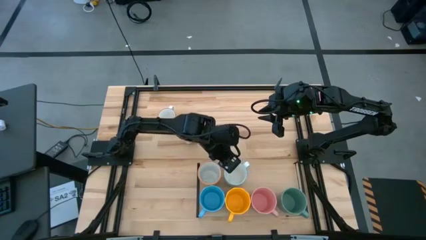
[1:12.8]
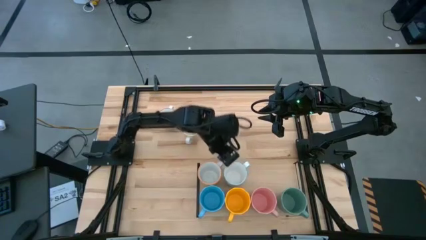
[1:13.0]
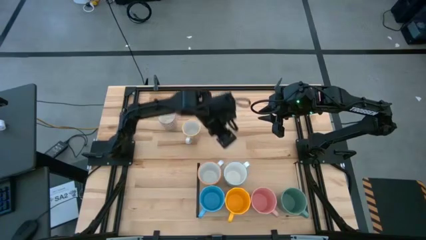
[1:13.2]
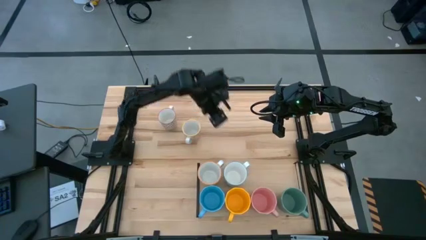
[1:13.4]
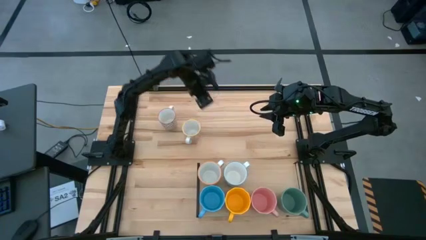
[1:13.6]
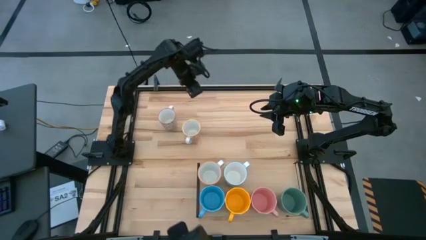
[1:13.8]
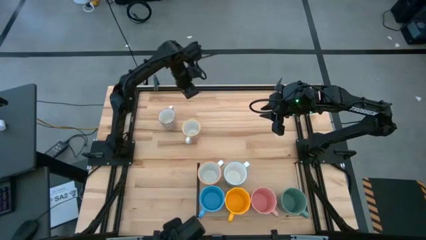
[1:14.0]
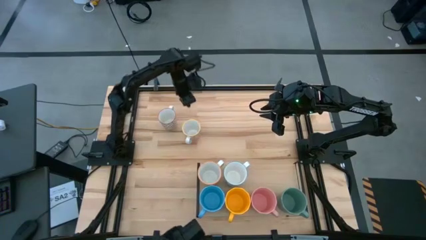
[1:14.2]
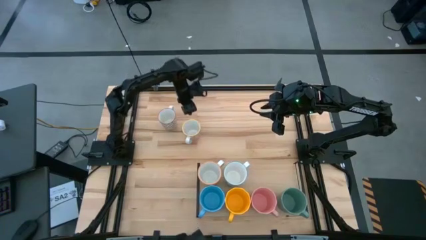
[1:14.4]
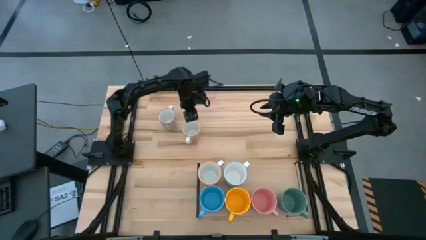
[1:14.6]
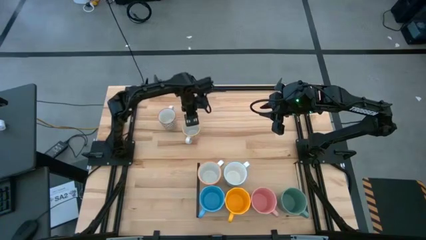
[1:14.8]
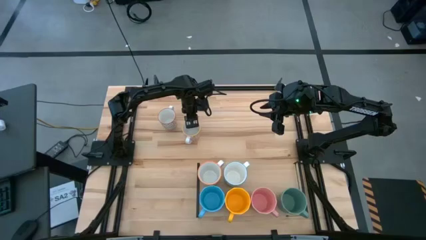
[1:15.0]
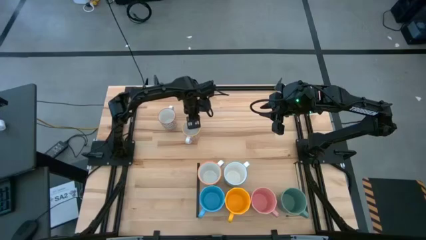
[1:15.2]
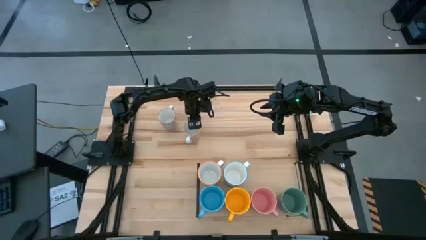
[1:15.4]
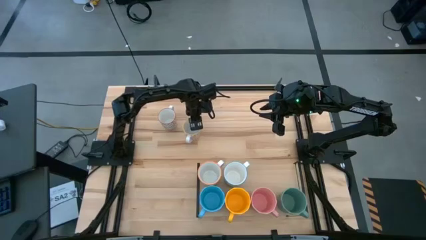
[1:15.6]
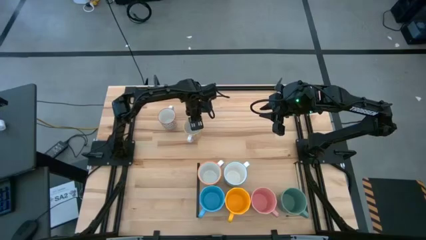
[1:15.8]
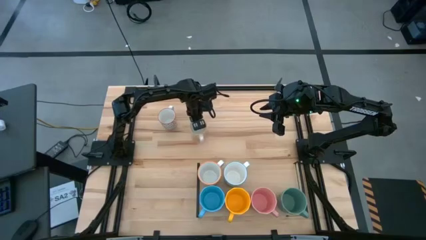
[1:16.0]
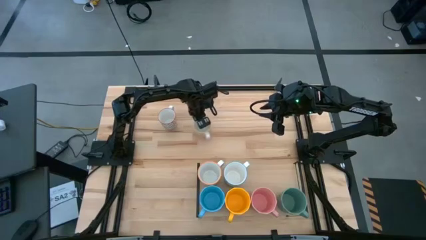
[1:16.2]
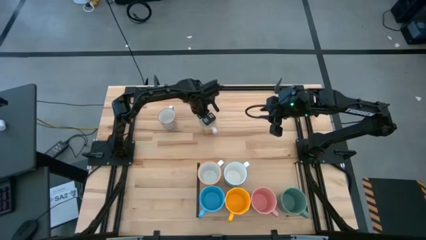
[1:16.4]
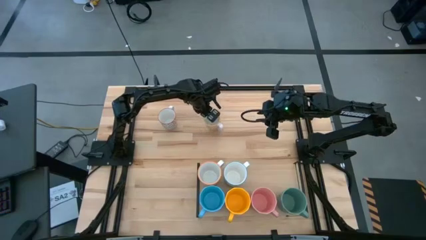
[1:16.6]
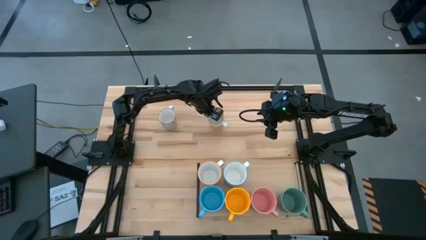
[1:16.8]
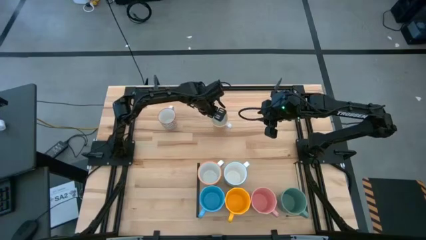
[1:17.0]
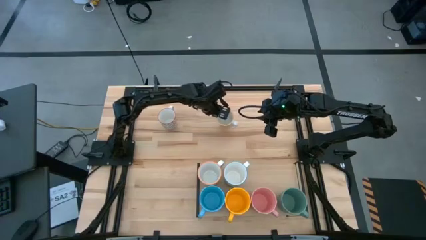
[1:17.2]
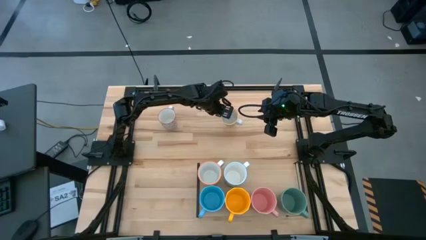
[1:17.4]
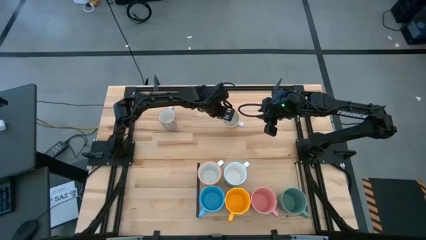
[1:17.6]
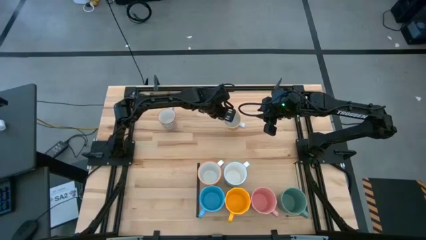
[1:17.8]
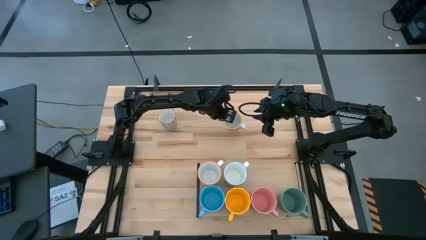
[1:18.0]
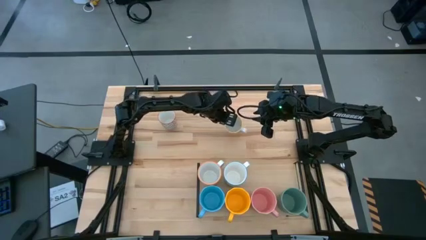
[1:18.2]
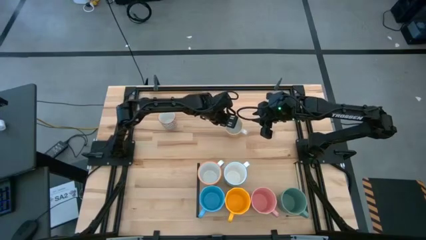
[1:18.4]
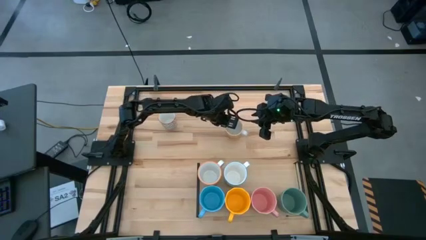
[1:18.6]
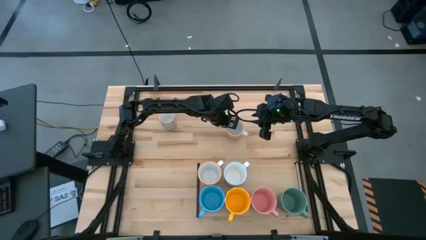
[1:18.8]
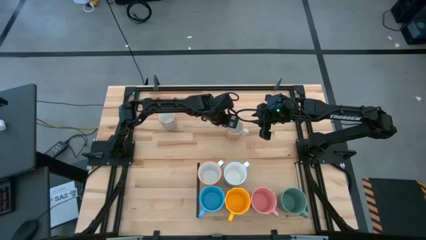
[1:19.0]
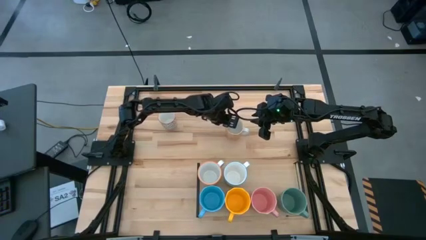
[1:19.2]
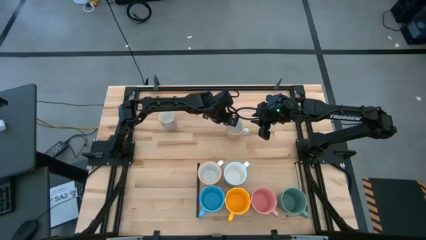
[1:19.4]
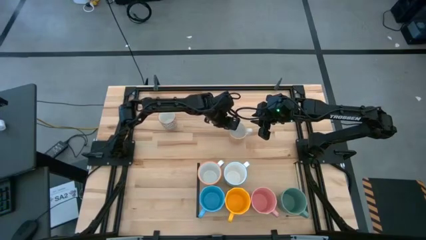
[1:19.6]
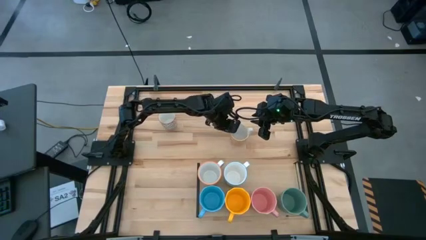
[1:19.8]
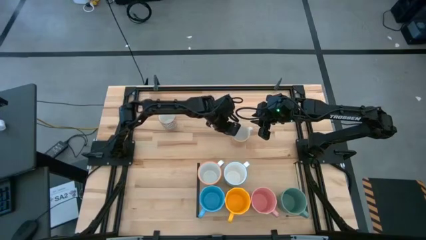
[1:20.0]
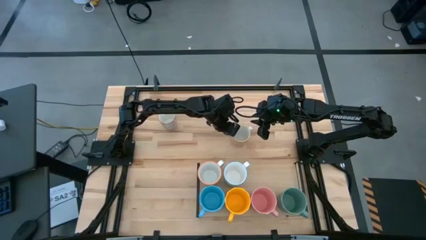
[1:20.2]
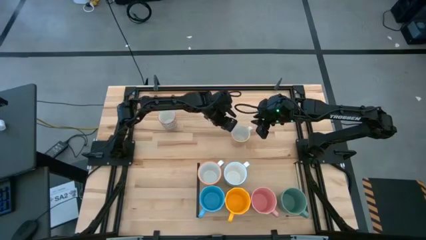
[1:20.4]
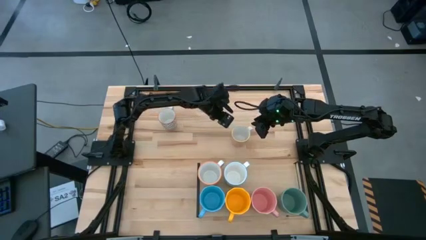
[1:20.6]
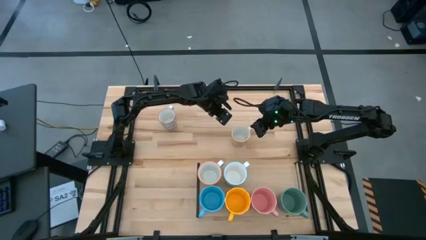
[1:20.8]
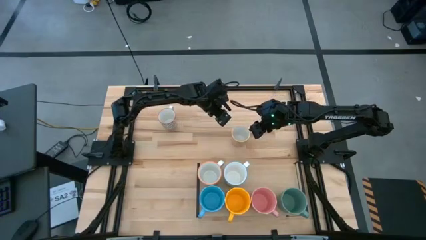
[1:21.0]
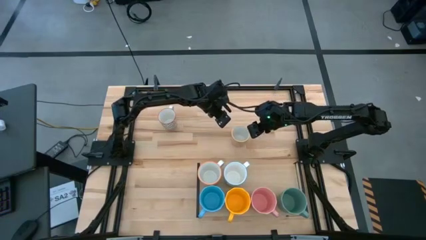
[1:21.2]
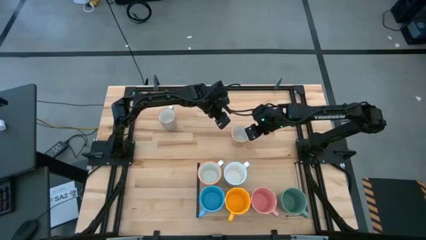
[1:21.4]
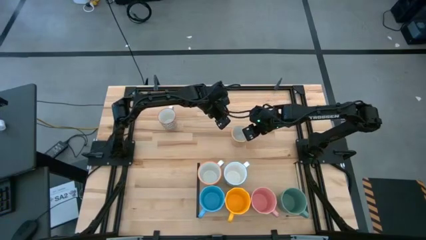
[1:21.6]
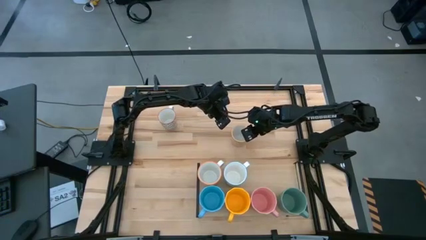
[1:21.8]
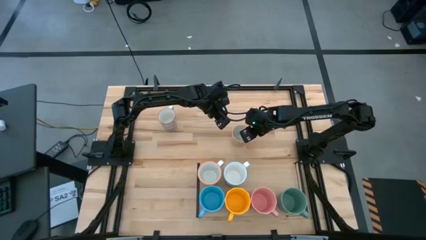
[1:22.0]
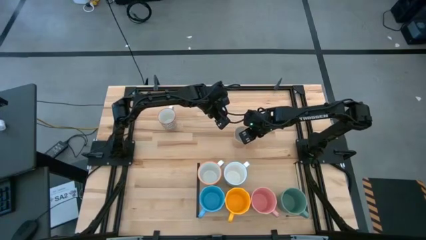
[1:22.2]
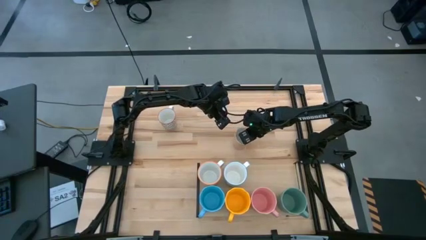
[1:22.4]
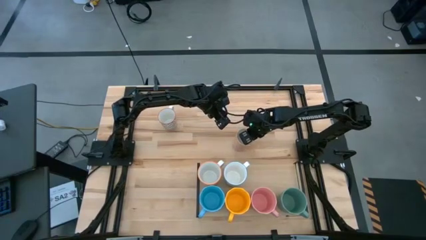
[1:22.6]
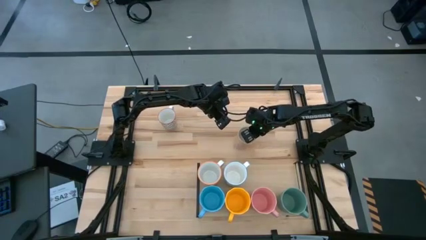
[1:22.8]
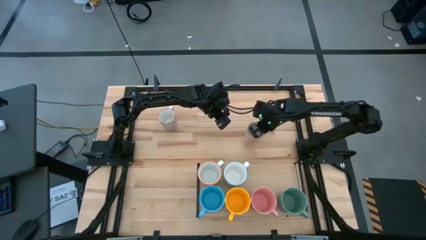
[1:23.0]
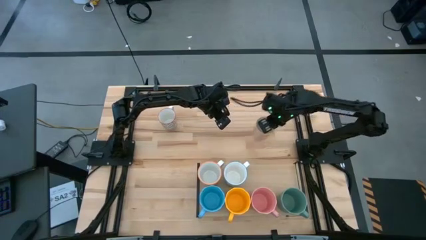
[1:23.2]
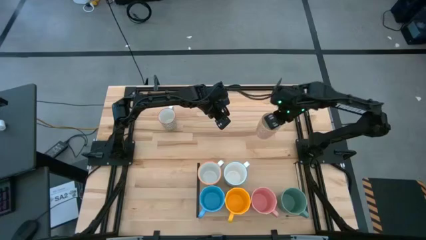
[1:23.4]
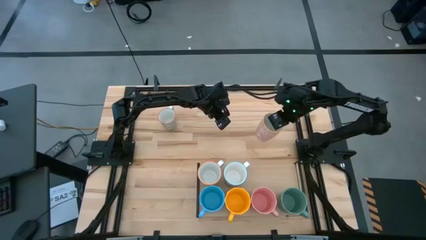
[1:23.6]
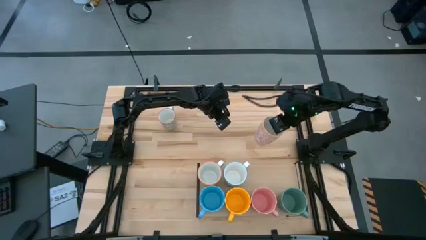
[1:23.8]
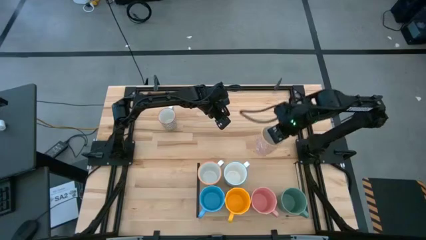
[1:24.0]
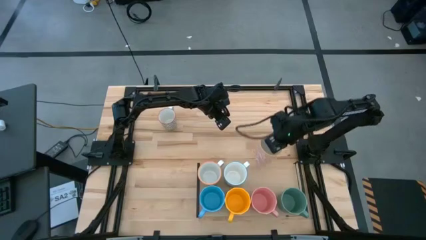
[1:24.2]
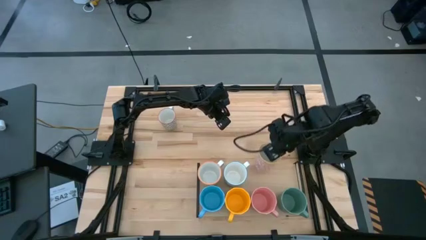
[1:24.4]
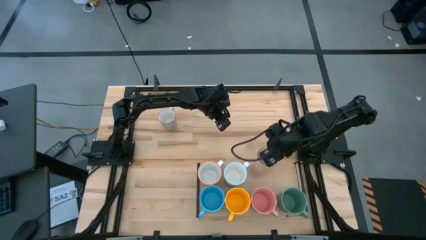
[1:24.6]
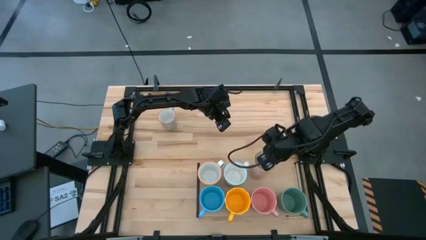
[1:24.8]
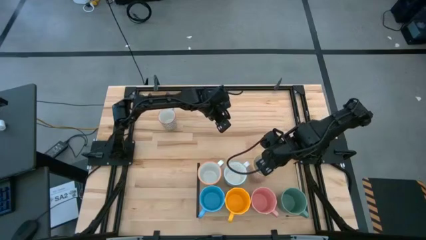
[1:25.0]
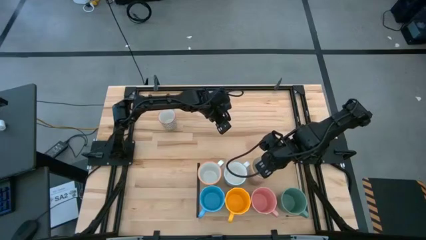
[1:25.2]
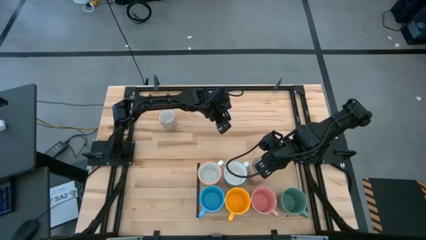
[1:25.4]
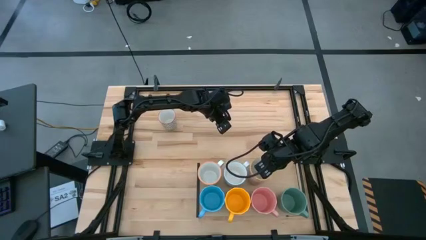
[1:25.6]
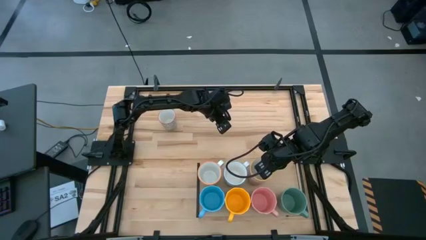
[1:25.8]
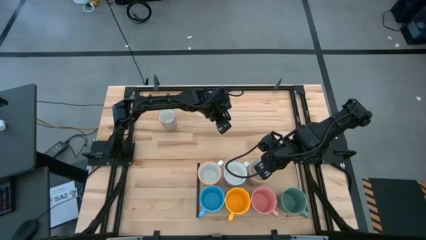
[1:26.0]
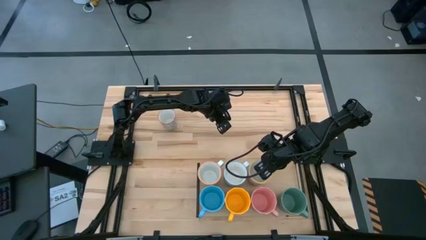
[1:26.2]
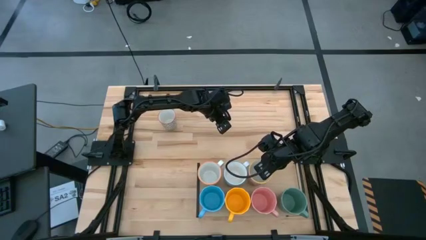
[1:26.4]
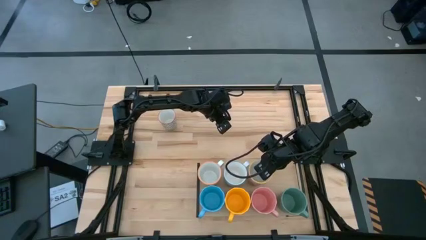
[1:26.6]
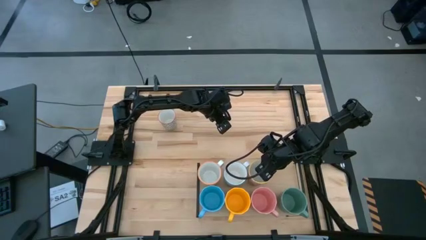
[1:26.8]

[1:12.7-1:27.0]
Task: Place coffee mugs
Put the orange patterned mug on the shelf

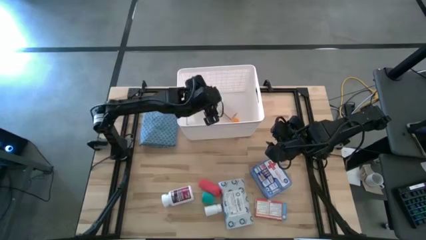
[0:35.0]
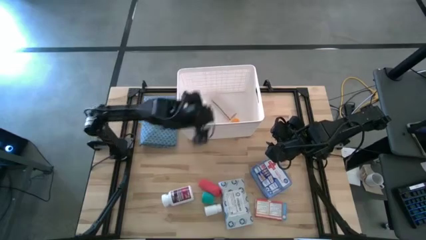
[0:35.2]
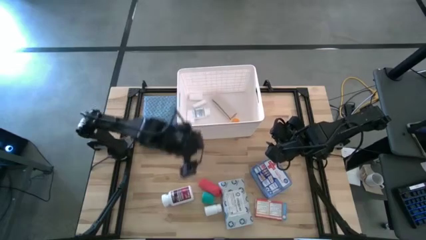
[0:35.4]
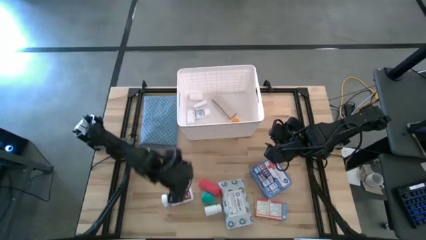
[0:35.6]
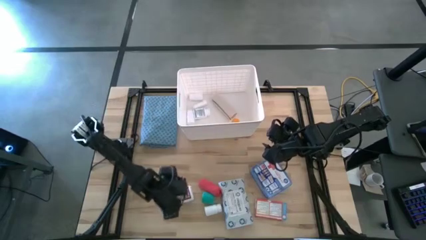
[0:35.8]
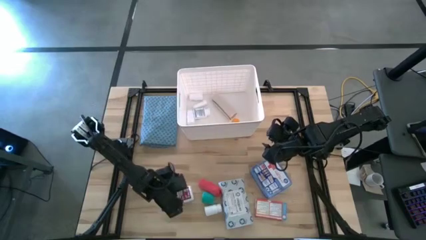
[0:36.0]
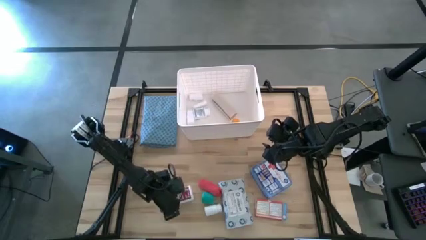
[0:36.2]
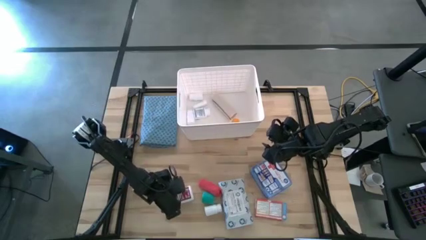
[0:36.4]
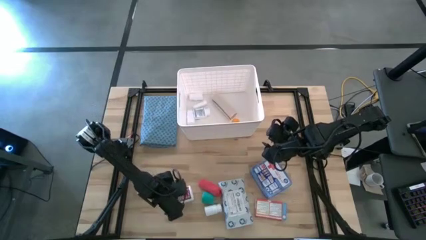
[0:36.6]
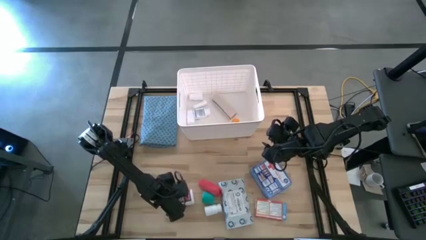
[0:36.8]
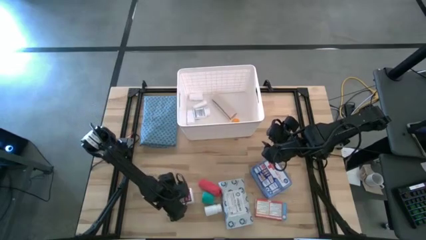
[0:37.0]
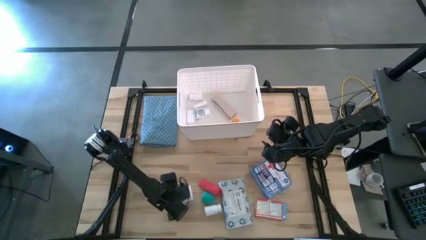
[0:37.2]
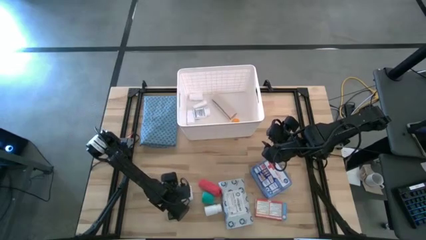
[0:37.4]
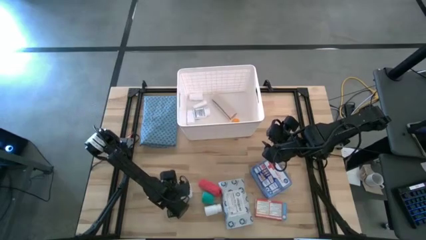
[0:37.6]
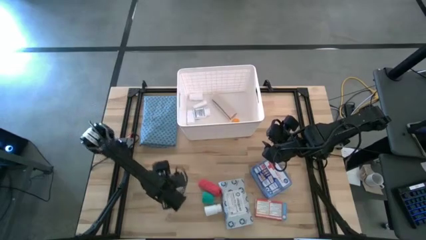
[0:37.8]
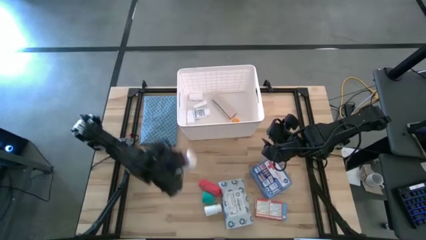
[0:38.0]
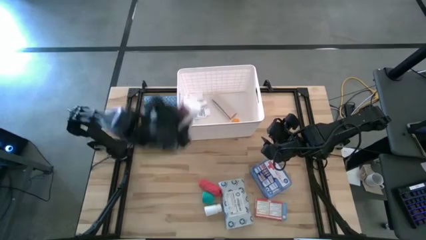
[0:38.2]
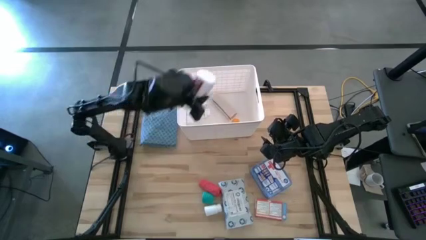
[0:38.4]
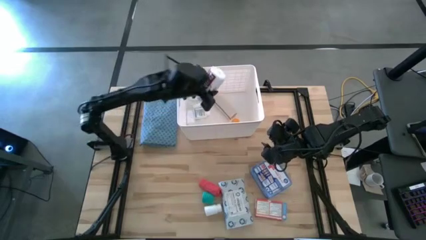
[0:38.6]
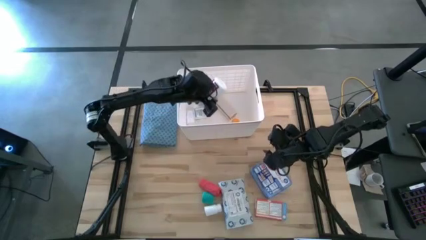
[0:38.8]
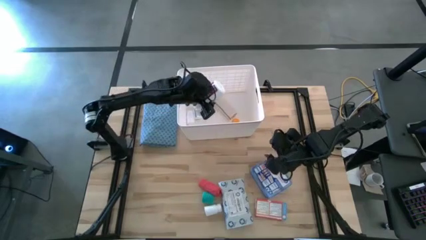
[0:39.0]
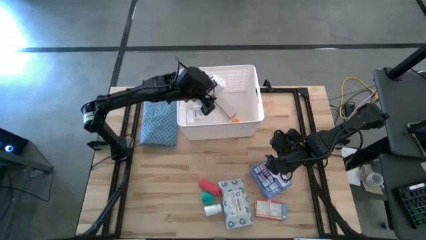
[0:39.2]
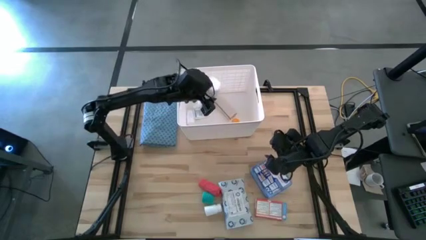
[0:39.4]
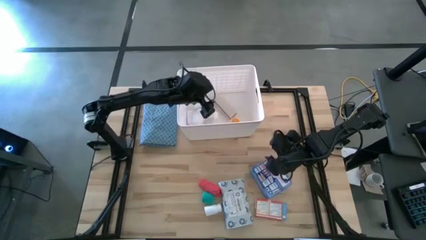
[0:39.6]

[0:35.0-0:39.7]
Task: Pick & place medical supplies in basket/bin
Put the white and purple pill bottle into the white container
